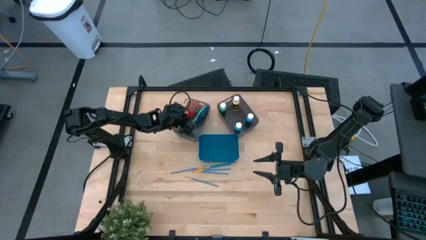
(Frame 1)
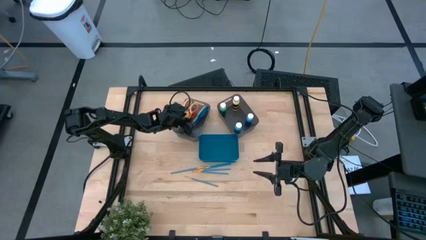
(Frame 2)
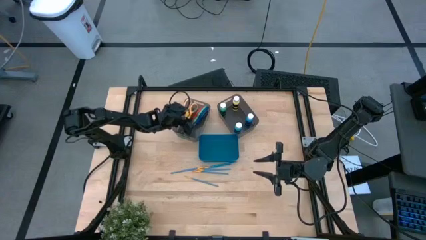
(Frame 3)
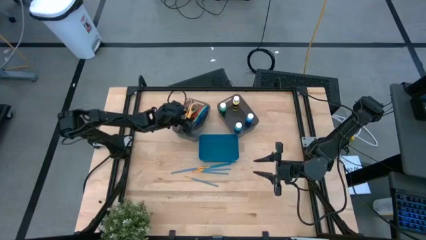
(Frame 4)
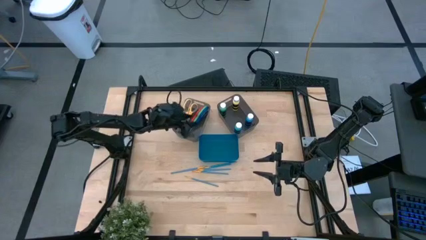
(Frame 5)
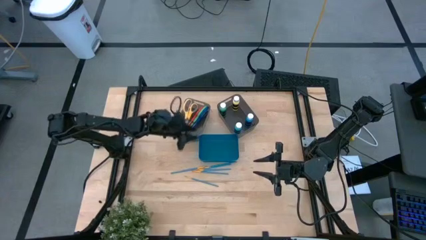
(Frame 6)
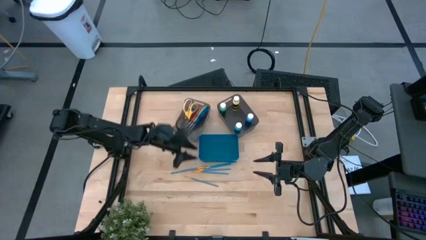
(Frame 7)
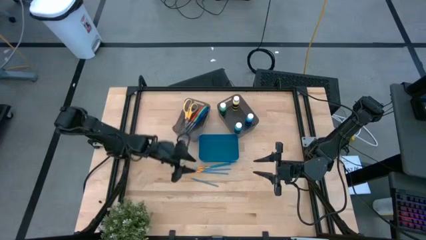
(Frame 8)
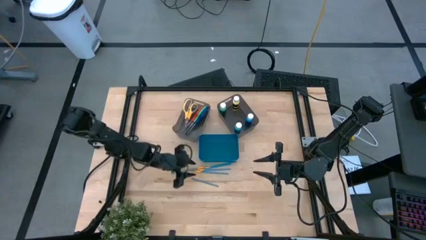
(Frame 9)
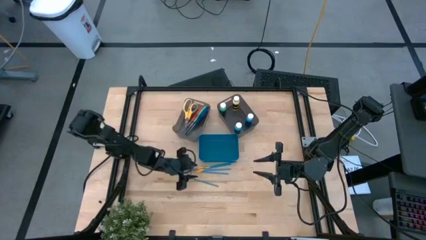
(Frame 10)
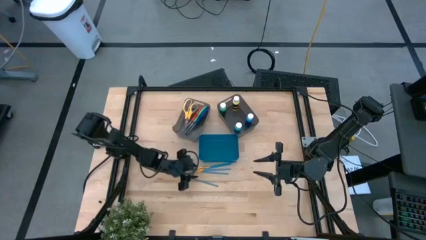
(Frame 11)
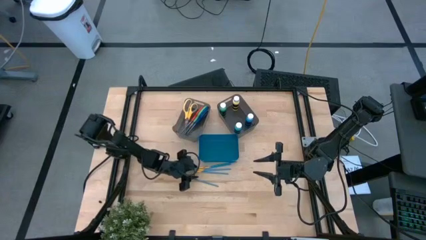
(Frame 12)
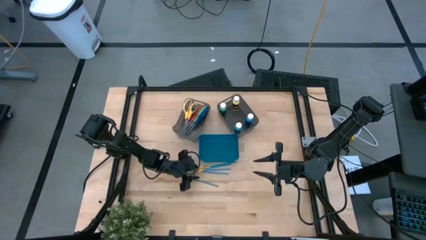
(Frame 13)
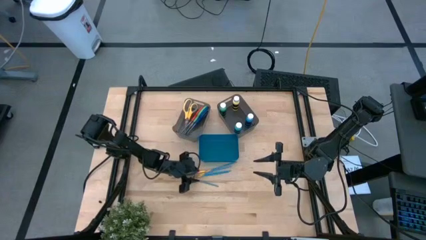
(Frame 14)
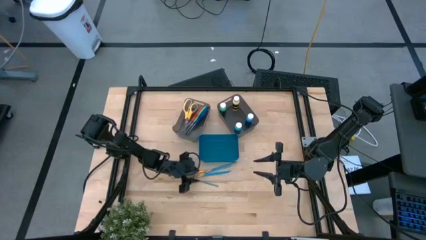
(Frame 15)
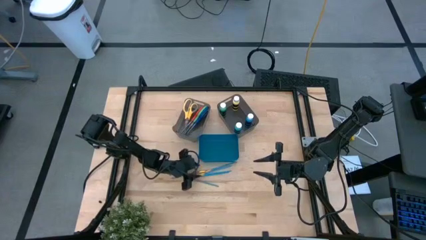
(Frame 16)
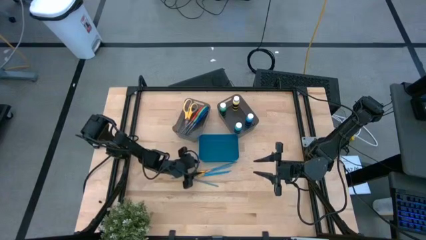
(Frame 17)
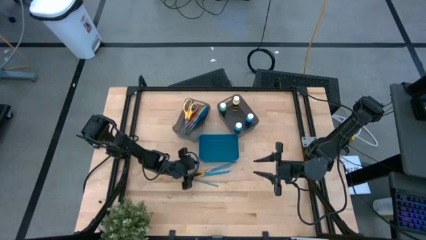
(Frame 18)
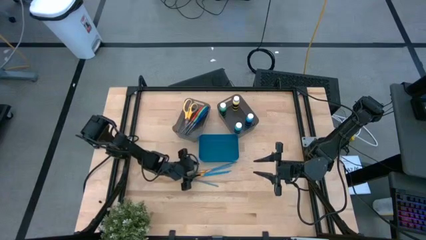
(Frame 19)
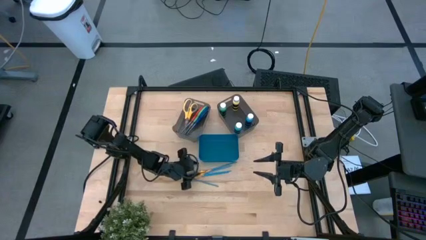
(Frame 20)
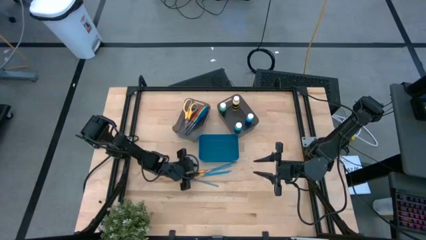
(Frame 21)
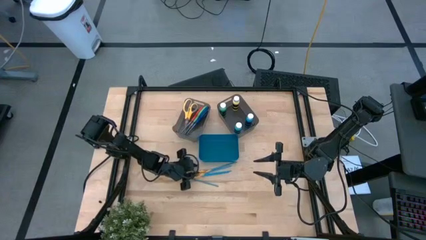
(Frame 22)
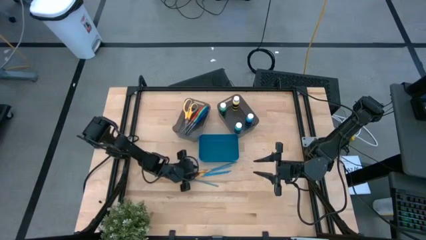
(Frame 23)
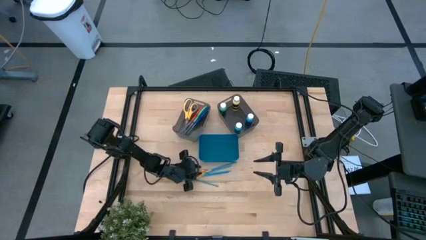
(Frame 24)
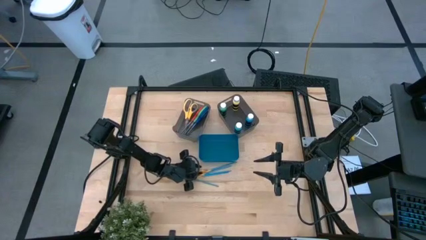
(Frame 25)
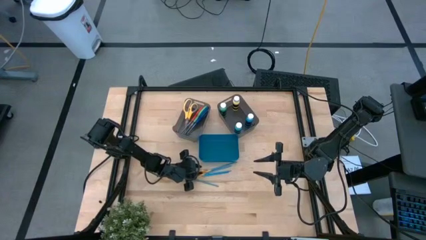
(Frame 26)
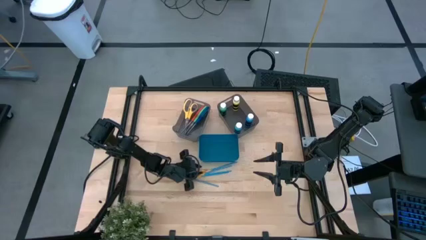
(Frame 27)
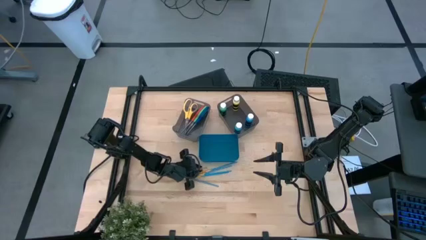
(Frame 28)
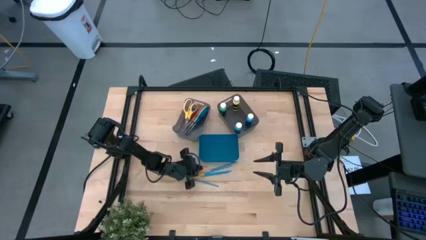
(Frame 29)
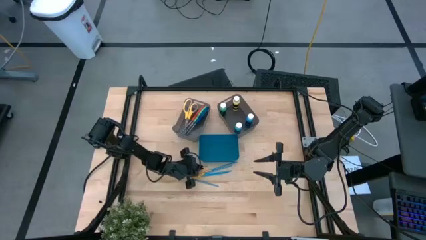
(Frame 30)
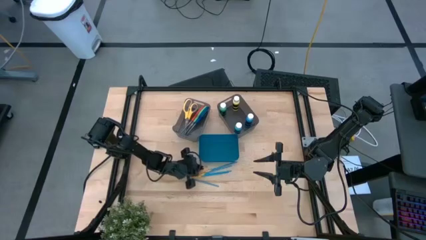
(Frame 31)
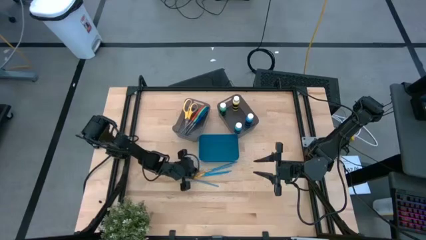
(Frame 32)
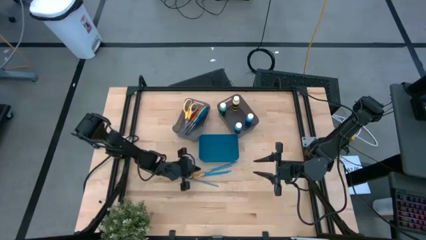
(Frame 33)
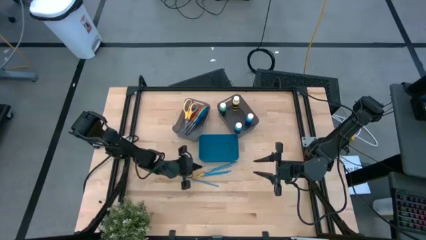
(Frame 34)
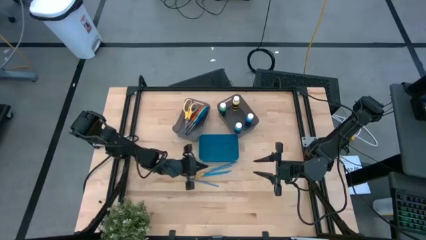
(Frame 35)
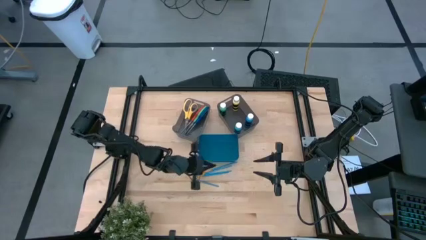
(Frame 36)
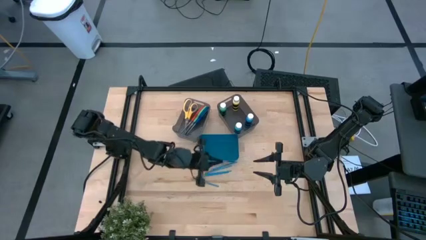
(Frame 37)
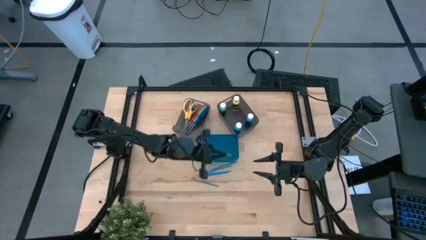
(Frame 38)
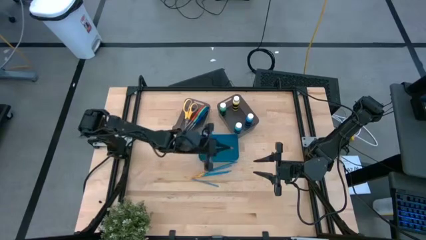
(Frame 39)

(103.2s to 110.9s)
Task: Pick & Place Paint Supplies
Put the blue paint brush into the blue bin

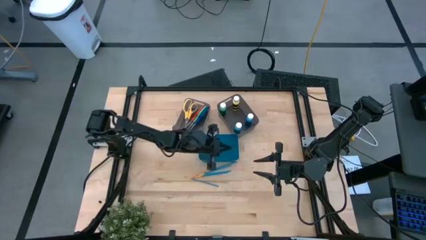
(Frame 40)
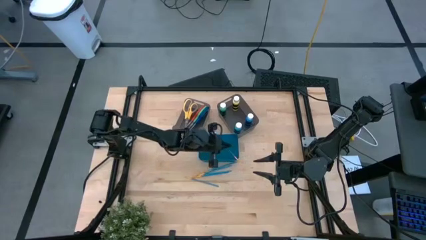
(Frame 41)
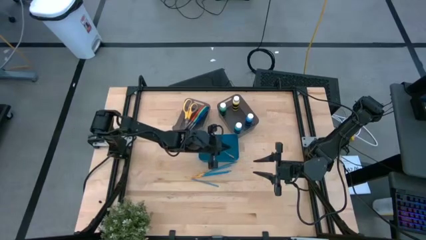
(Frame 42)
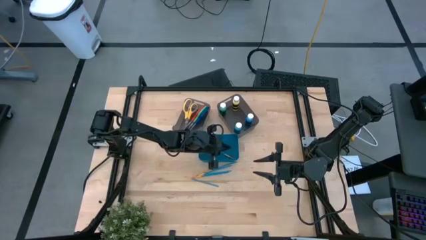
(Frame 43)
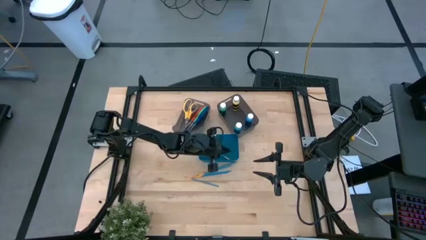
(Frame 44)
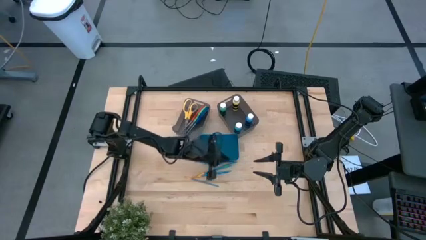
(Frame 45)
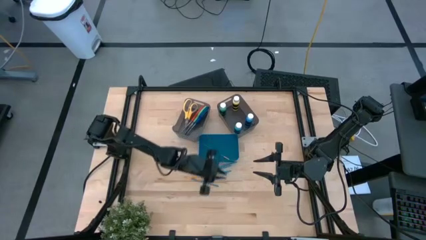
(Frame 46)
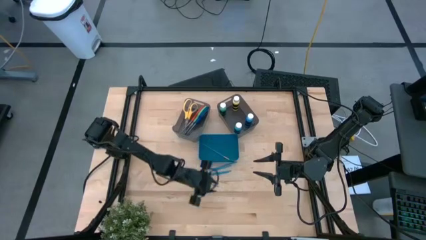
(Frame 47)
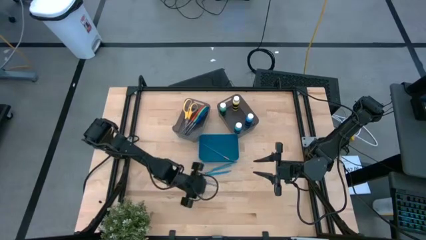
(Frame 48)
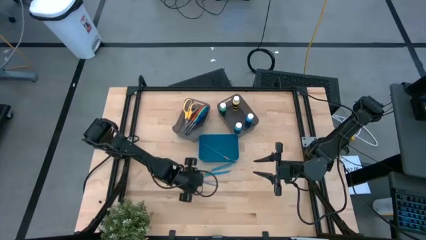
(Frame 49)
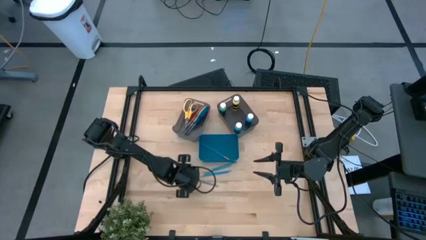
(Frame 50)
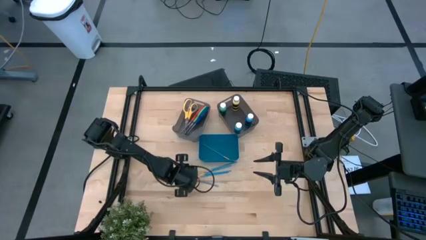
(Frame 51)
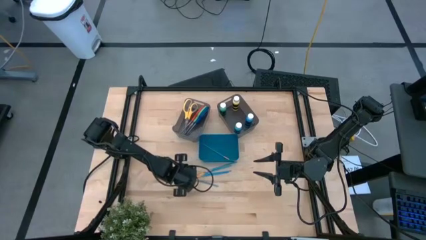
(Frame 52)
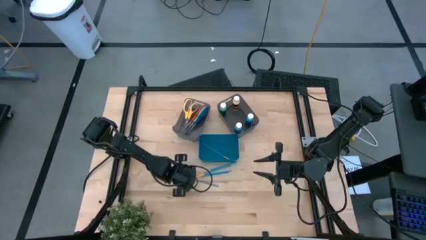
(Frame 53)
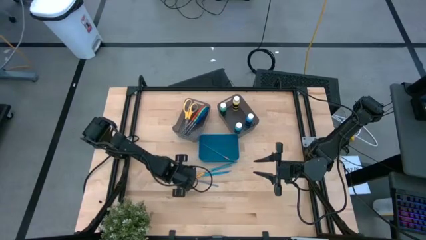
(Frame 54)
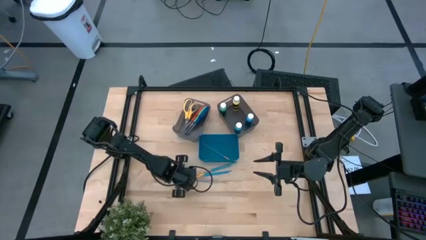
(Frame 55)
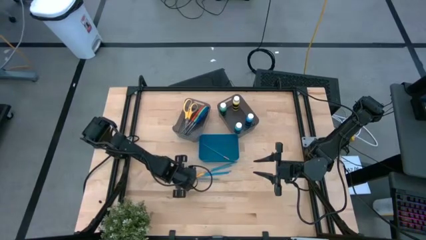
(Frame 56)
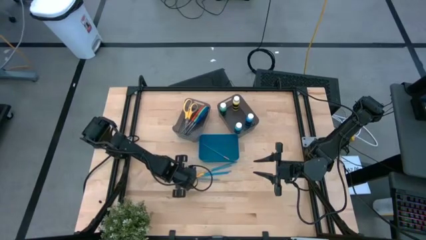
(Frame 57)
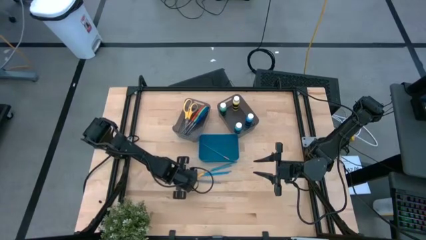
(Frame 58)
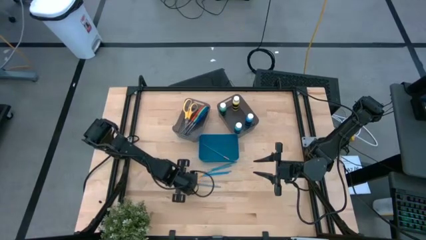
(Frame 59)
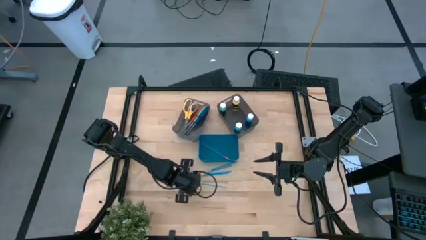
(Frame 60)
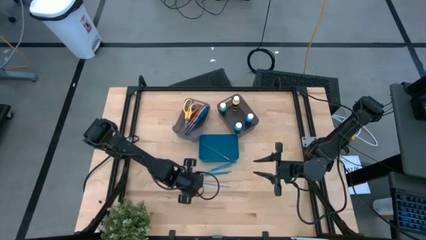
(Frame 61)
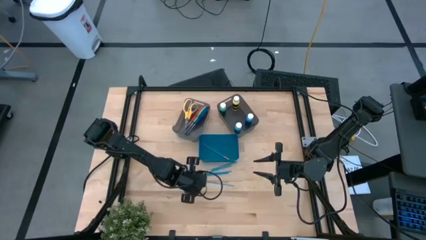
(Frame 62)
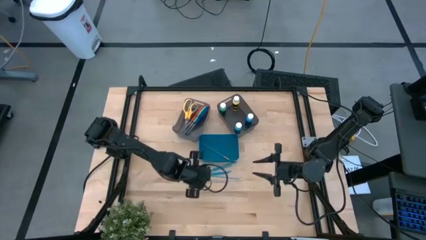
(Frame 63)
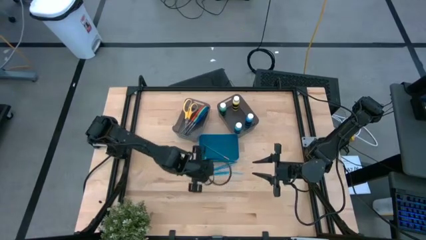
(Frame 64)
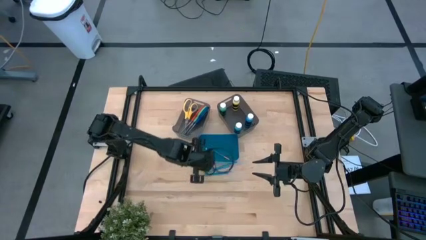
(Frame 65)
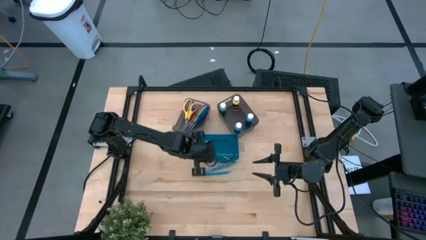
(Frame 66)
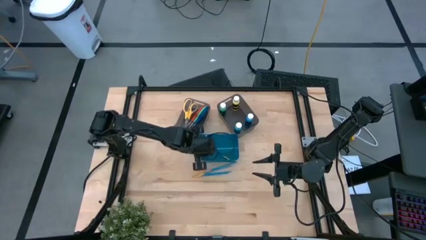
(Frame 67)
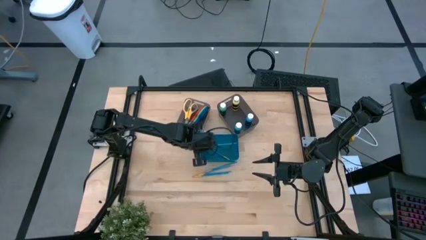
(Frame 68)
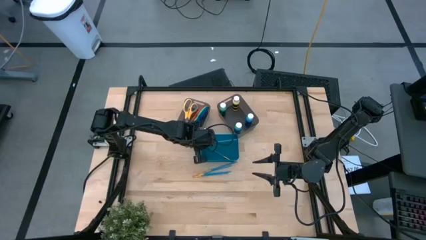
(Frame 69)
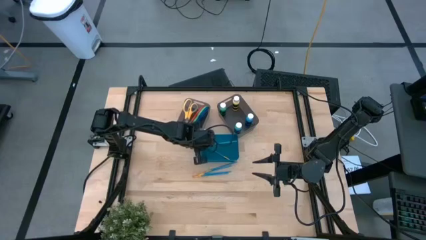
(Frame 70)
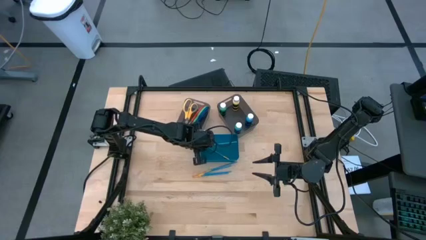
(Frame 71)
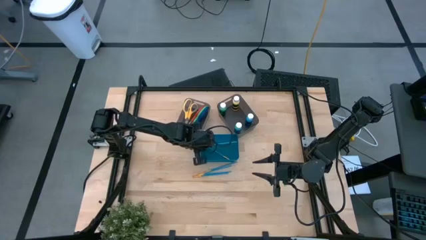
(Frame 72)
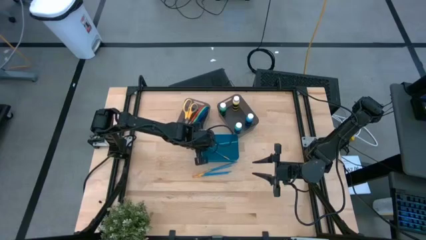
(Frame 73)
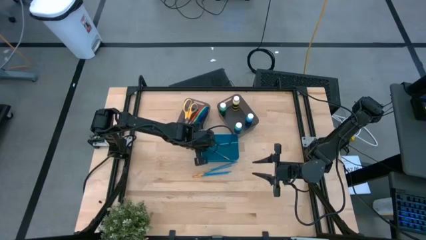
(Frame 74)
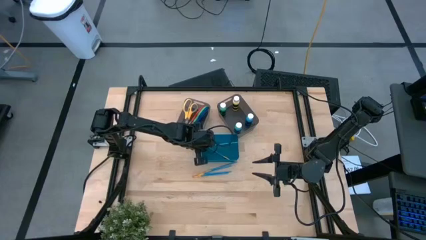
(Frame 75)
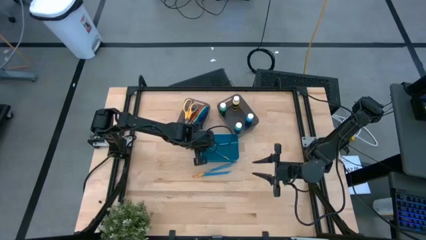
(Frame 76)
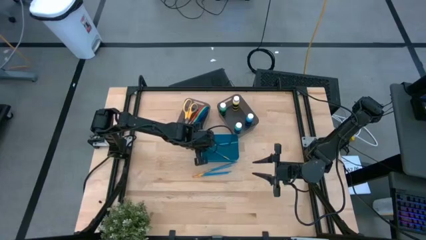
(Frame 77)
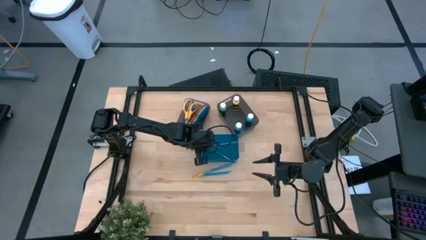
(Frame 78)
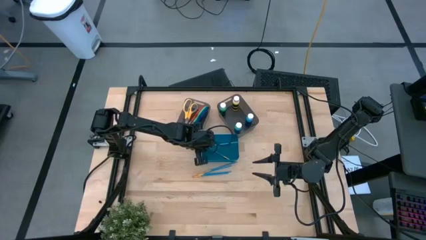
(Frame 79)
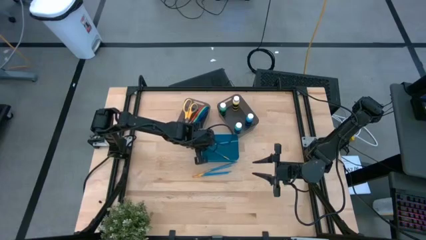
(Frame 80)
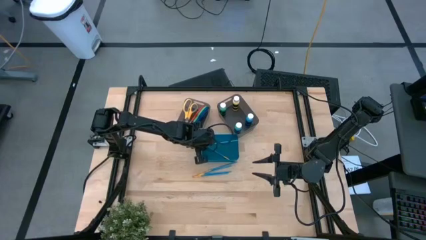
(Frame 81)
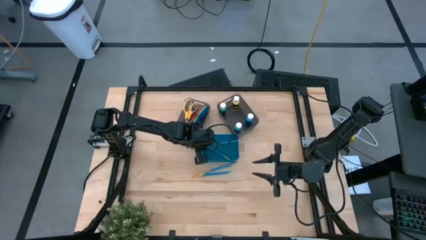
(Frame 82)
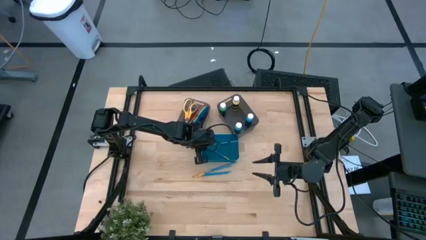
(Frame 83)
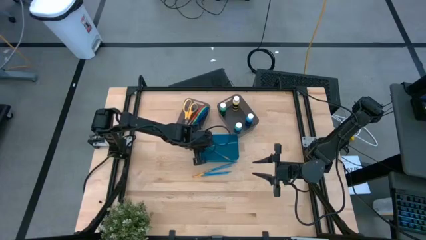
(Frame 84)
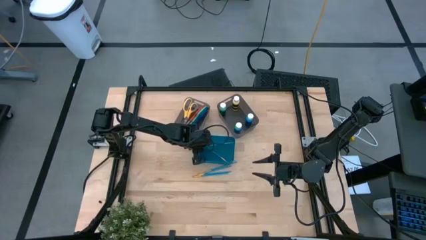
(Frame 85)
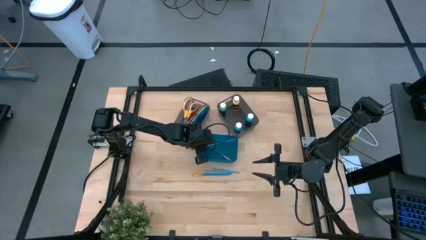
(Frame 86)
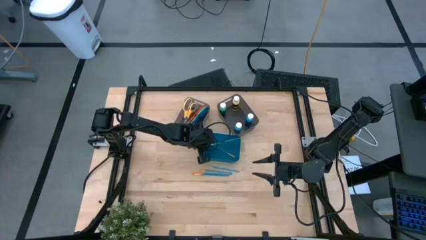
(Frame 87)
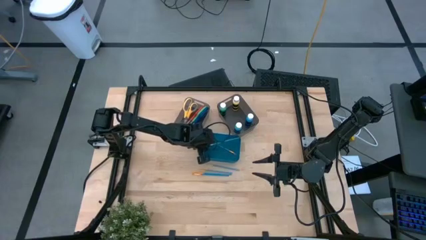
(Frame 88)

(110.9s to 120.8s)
Put the blue paint brush into the blue bin
